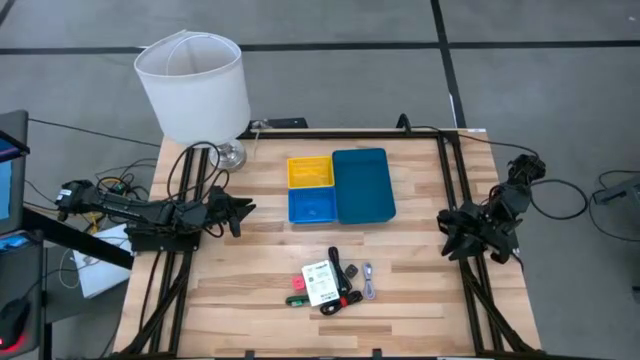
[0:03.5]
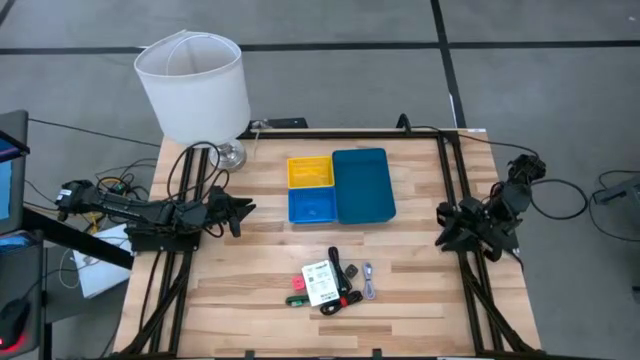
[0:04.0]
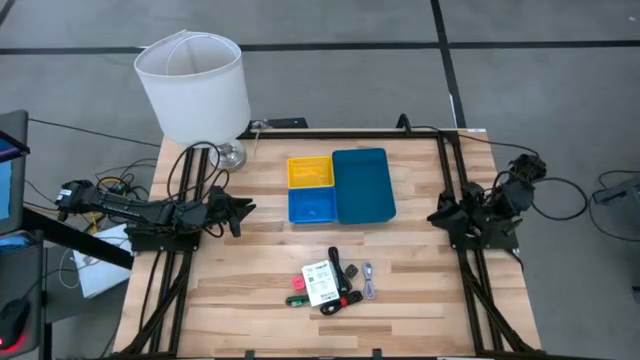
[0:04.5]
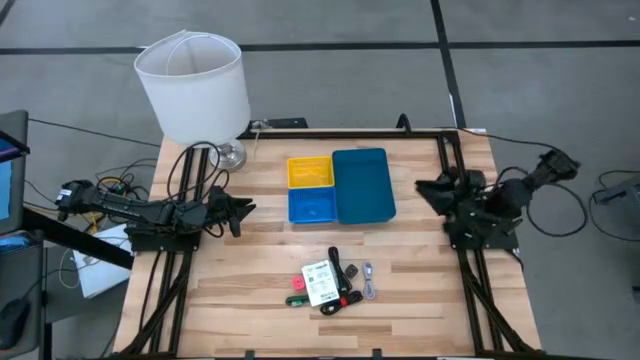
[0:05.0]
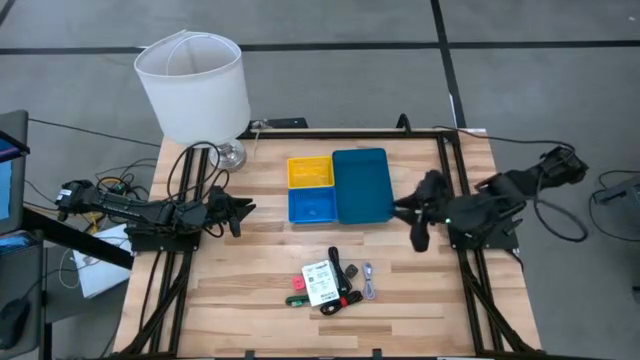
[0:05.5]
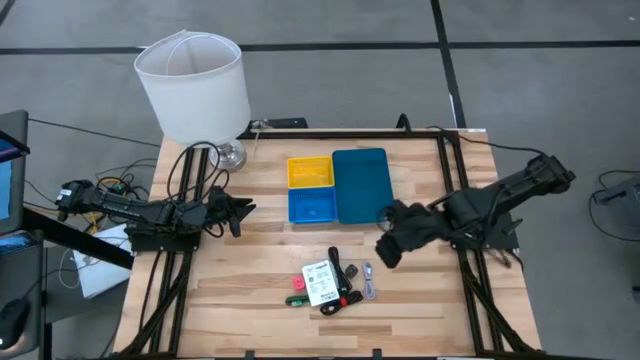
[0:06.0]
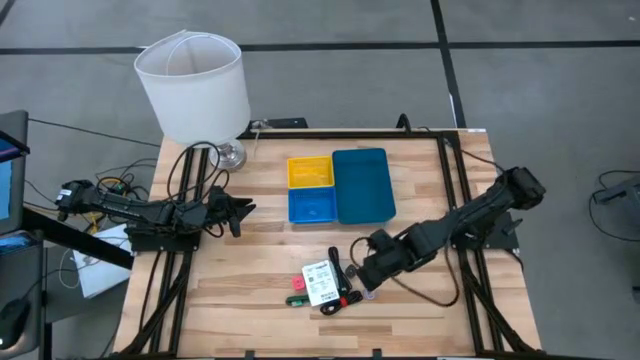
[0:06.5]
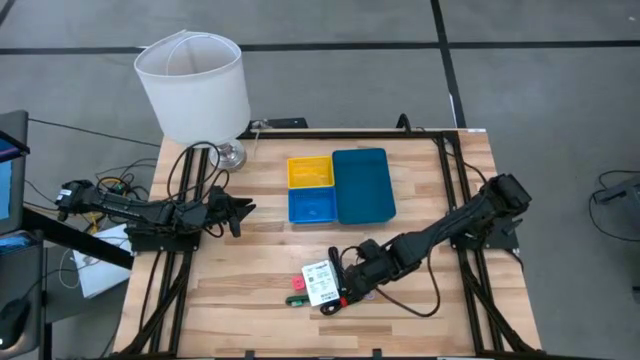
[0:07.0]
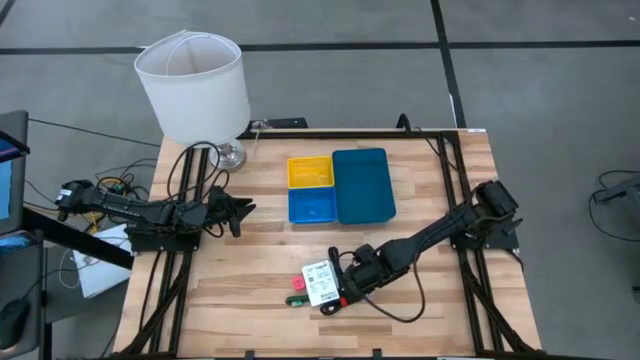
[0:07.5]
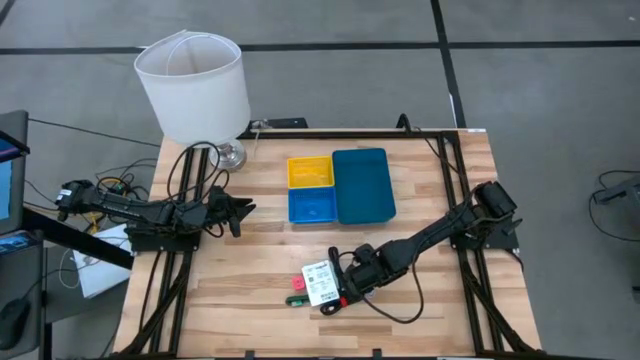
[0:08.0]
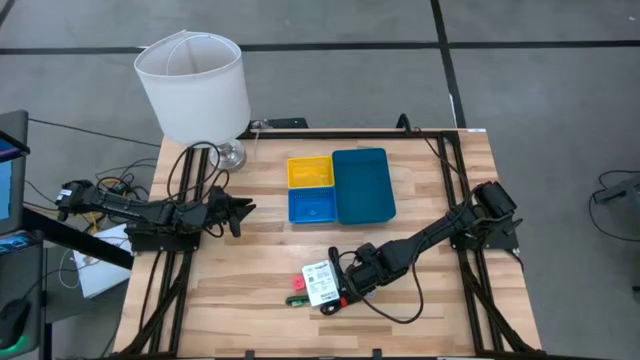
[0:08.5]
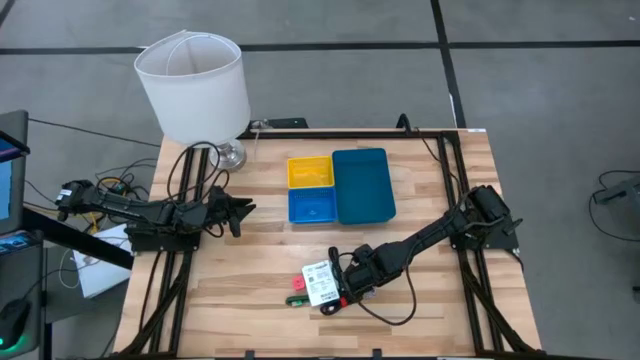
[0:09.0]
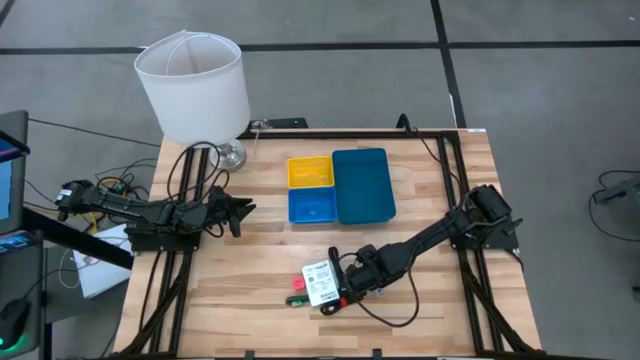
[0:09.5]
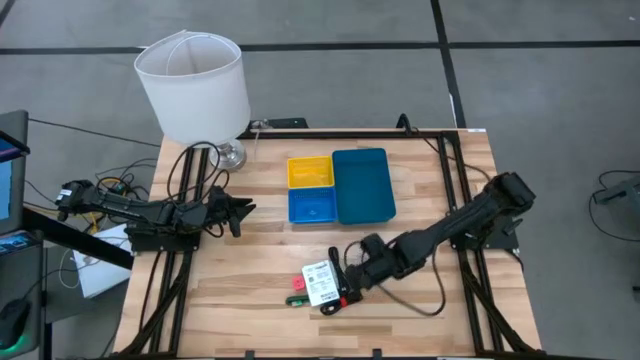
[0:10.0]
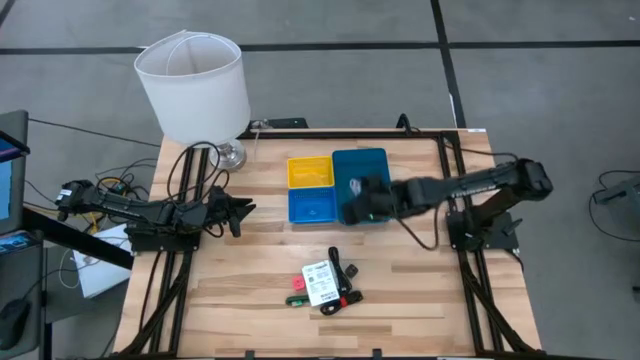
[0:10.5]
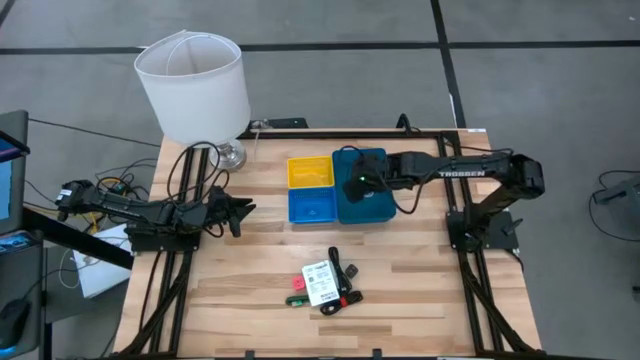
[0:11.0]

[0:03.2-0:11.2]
Task: Pick and place items into bin
Put the white charger cable in the dark blue bin

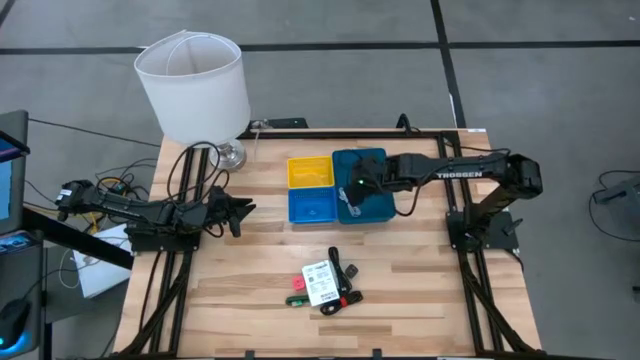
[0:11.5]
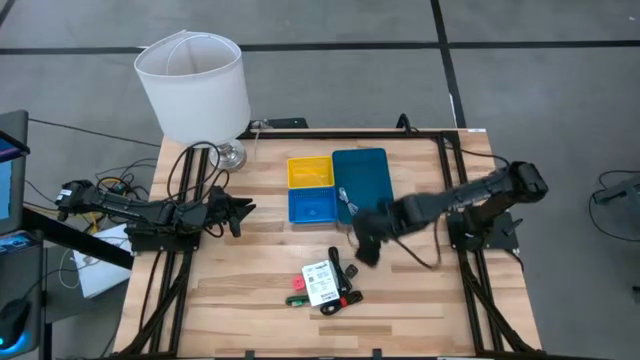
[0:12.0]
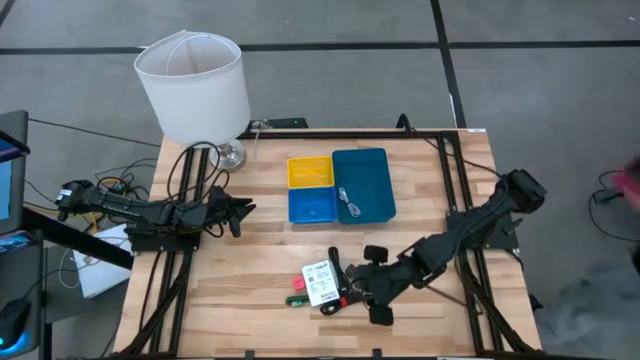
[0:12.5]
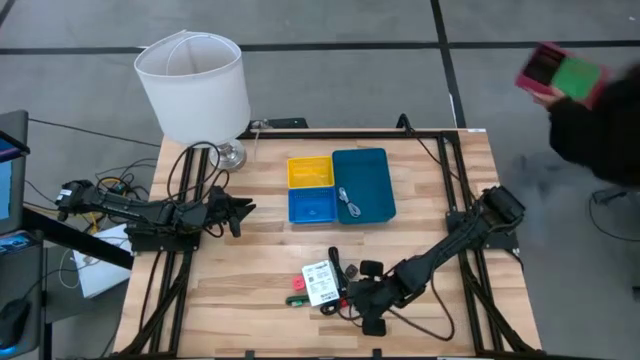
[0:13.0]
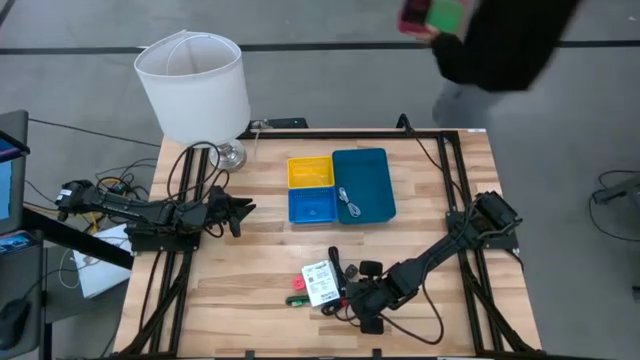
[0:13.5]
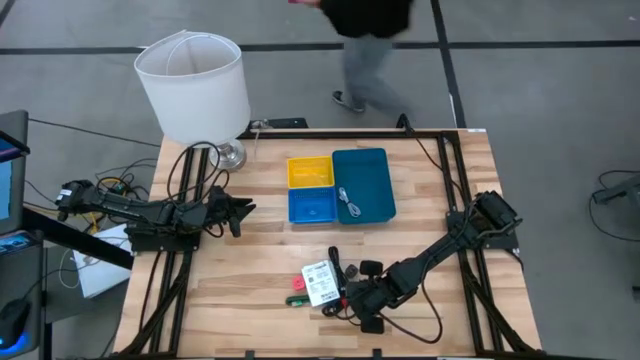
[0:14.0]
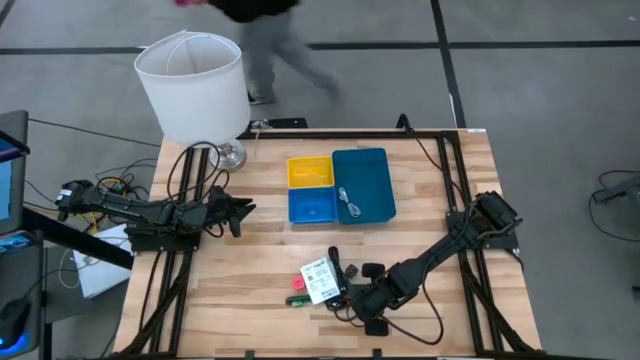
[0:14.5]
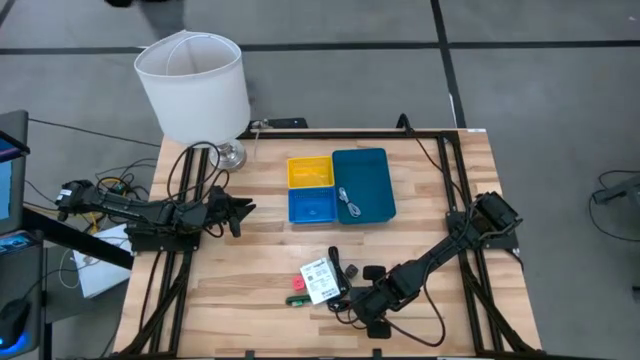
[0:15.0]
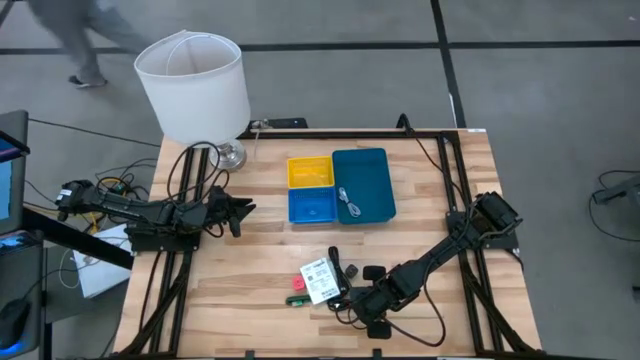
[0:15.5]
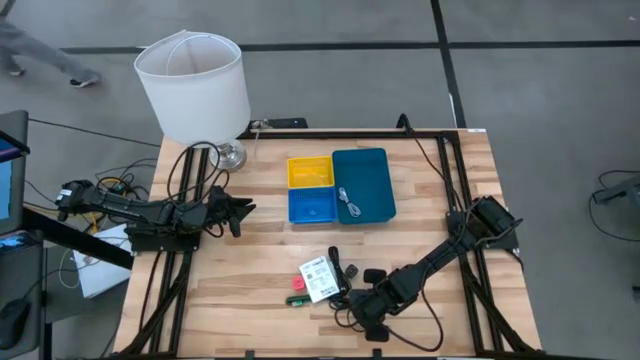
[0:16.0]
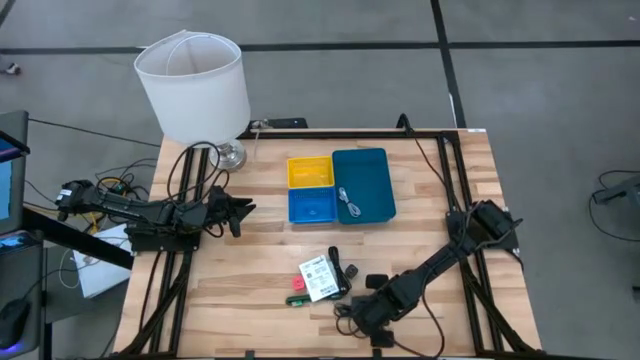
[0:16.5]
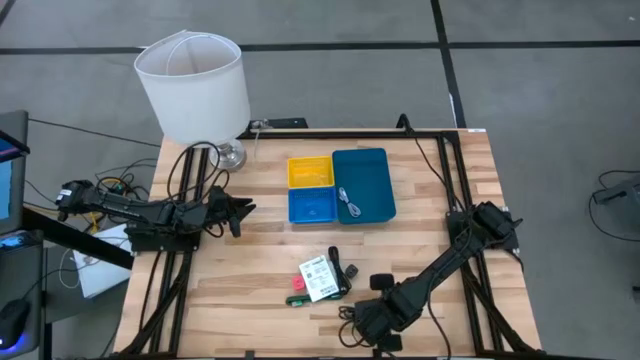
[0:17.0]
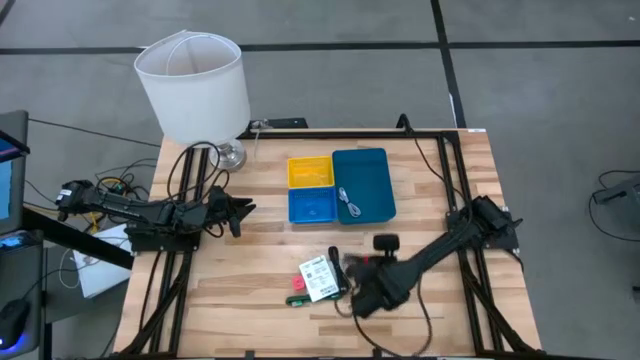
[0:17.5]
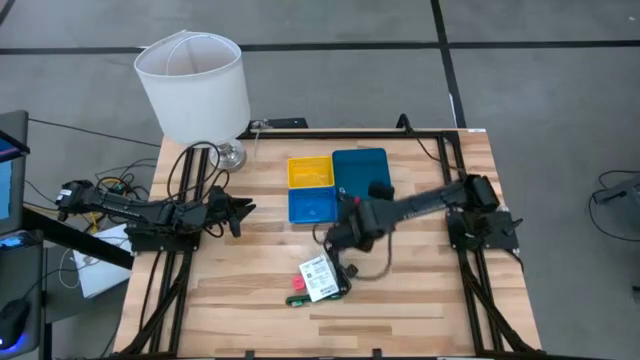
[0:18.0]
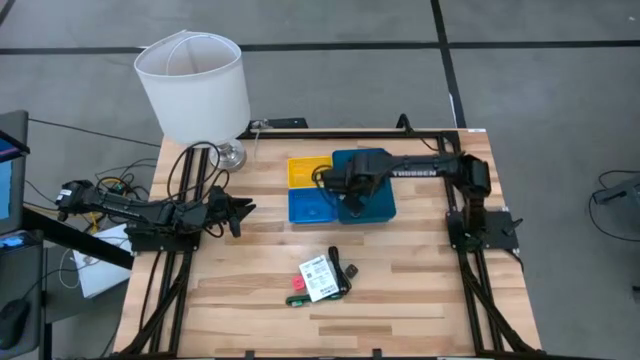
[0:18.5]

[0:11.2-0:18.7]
Put the bottom right black charger cable in the dark blue bin

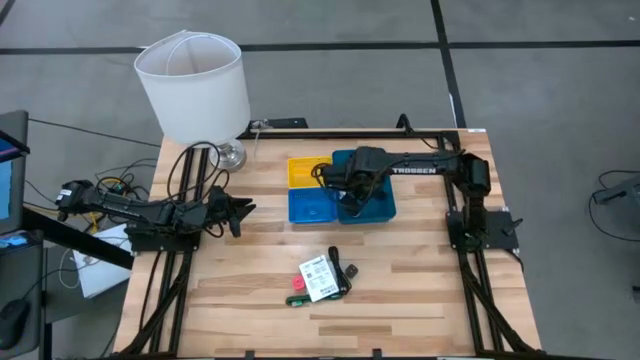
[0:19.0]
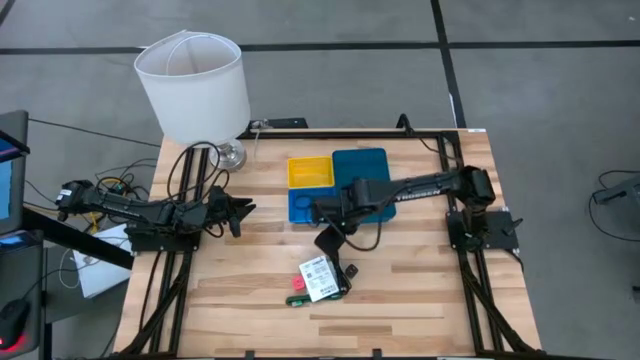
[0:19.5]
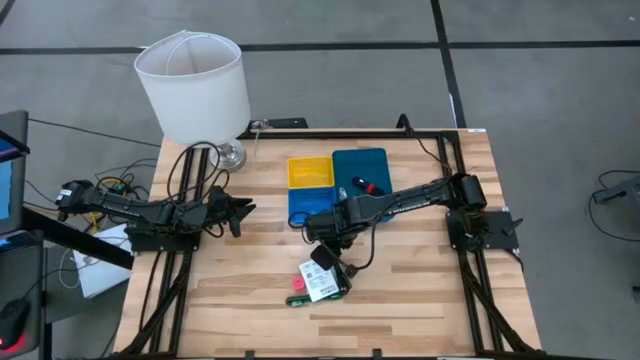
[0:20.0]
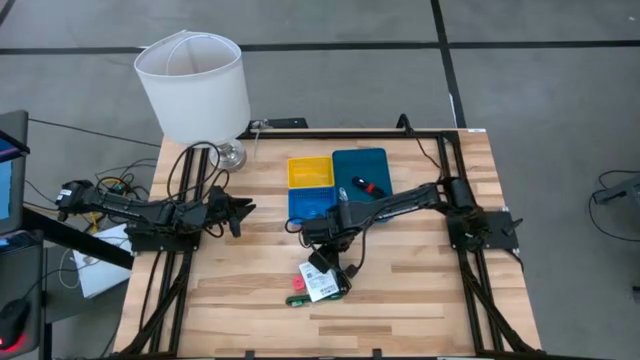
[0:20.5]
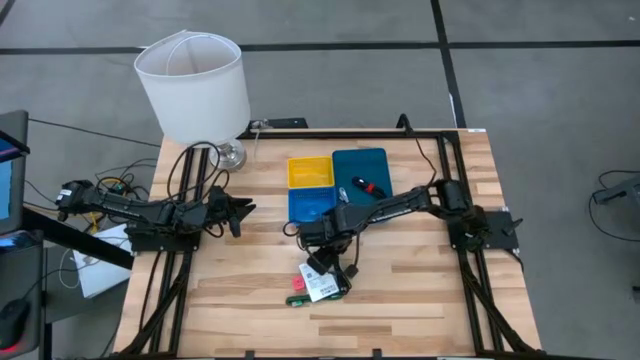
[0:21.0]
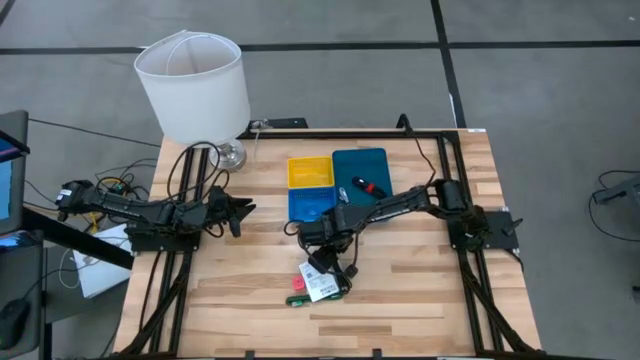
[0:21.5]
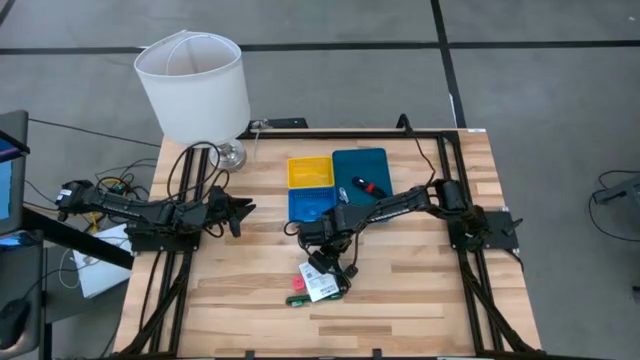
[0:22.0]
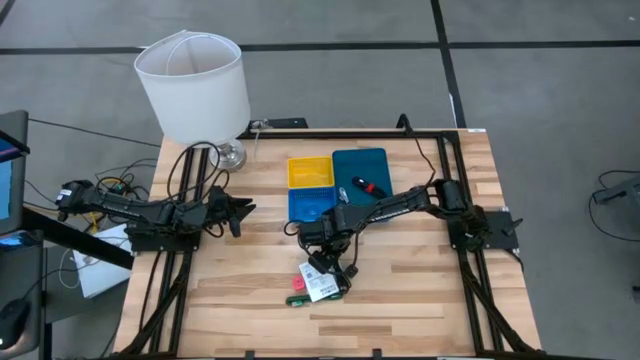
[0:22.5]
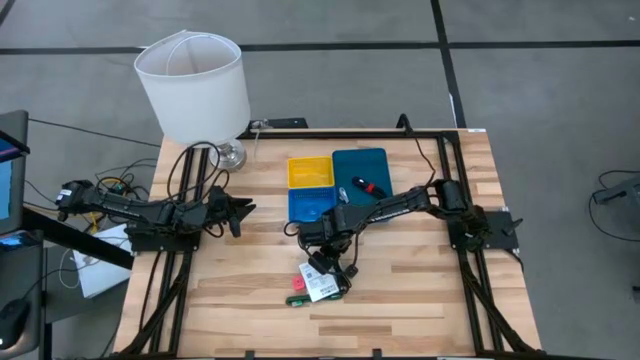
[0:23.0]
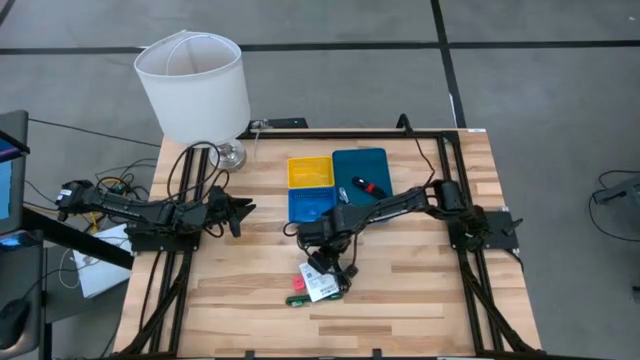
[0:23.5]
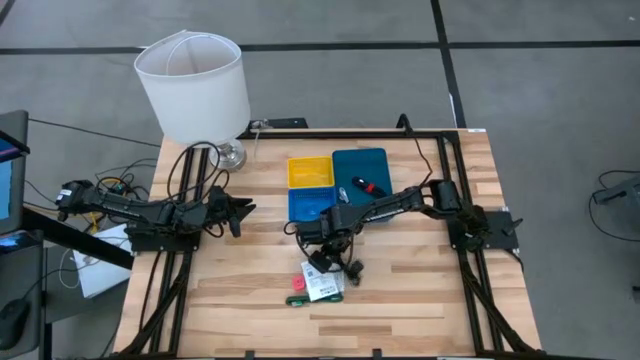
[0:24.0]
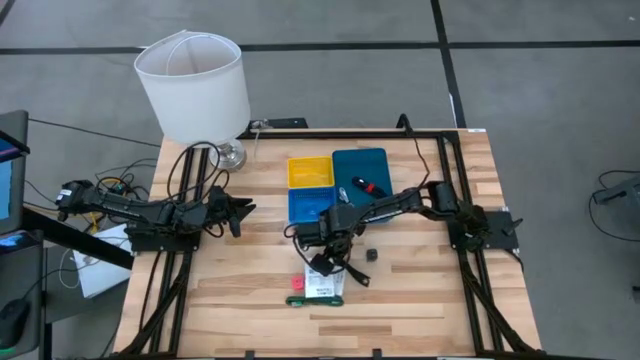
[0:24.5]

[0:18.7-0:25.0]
Put the black charger cable in the dark blue bin
